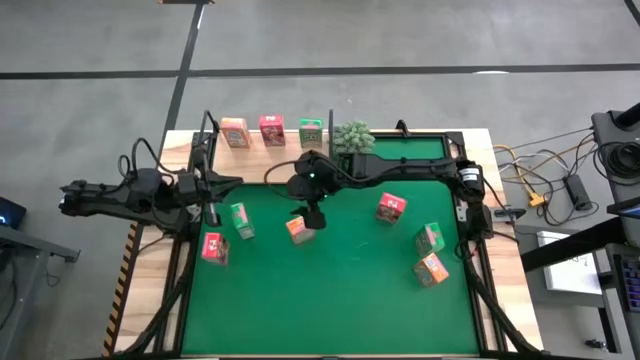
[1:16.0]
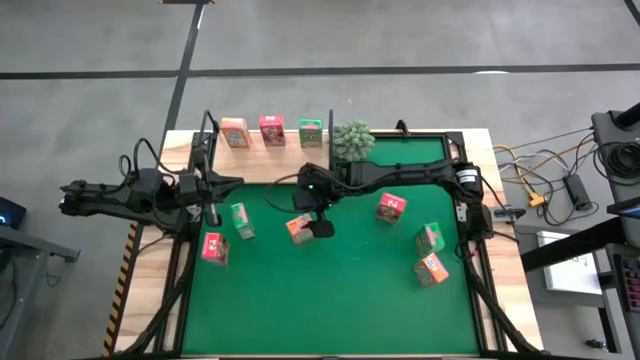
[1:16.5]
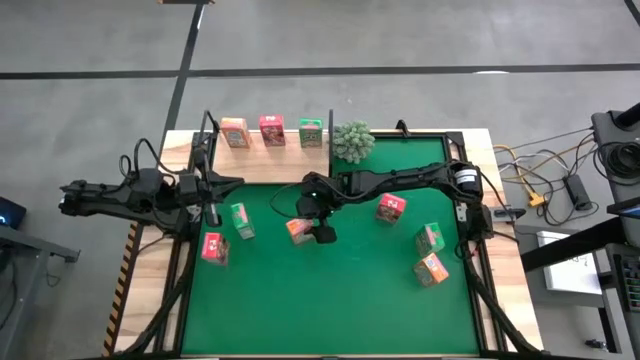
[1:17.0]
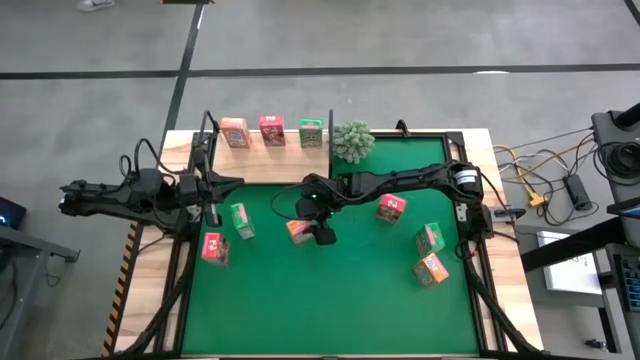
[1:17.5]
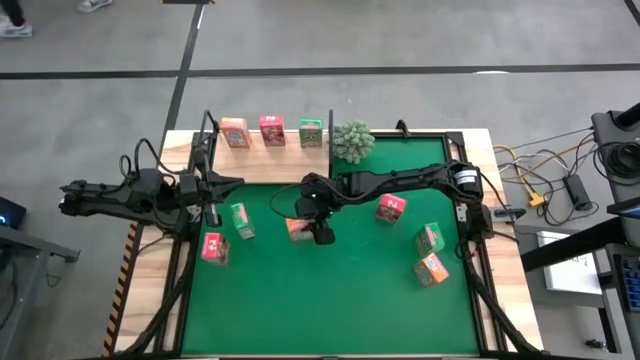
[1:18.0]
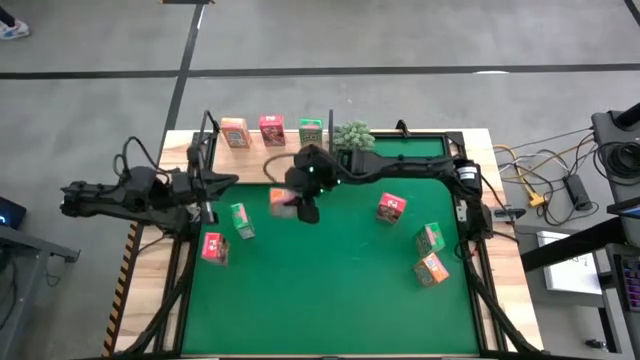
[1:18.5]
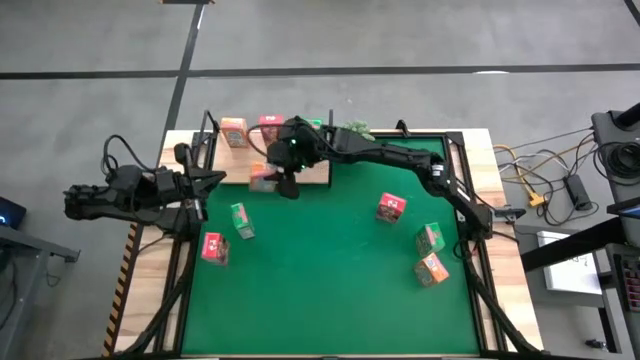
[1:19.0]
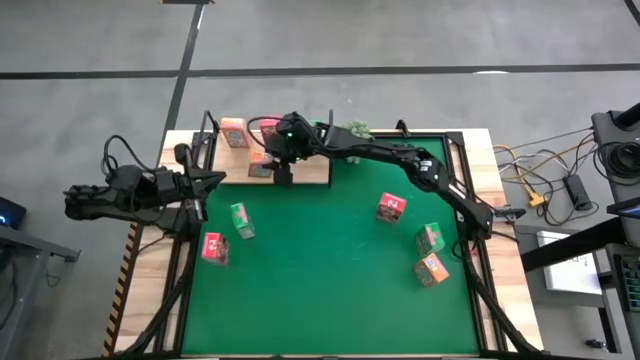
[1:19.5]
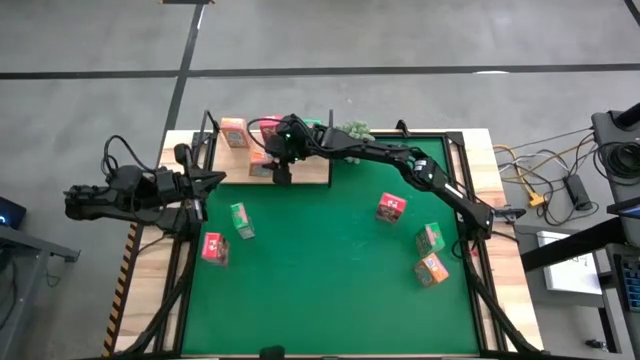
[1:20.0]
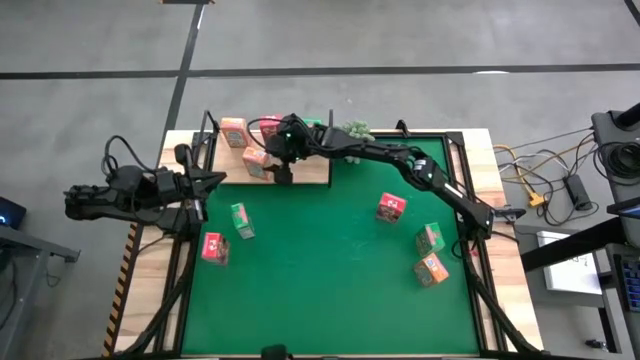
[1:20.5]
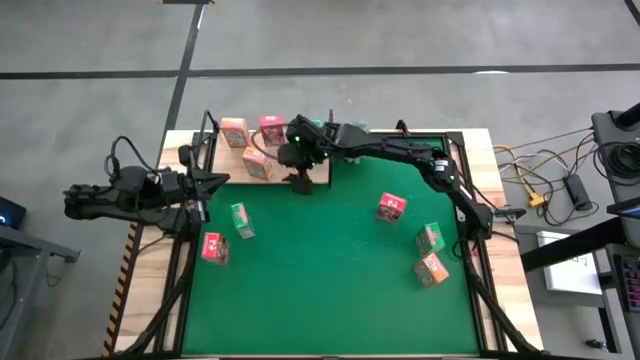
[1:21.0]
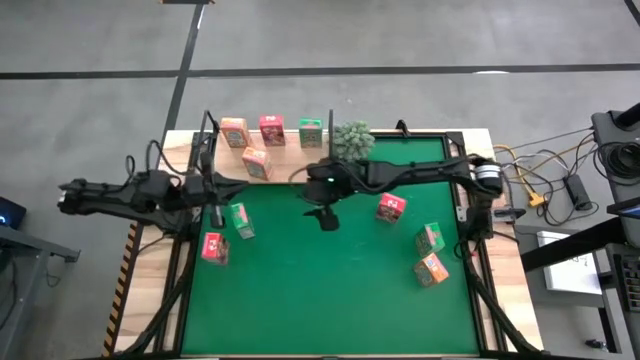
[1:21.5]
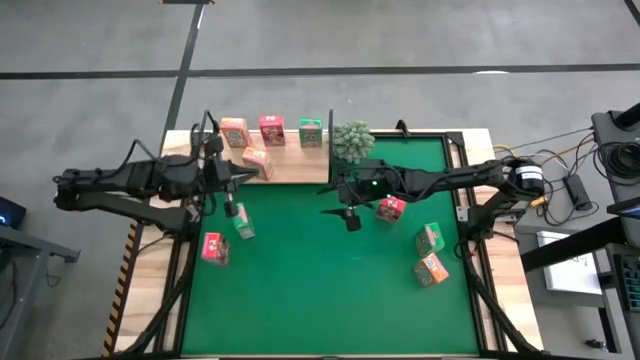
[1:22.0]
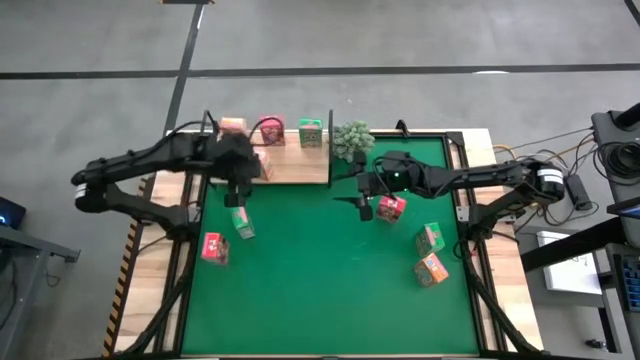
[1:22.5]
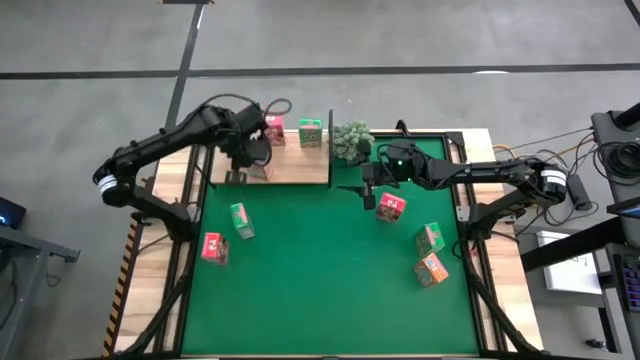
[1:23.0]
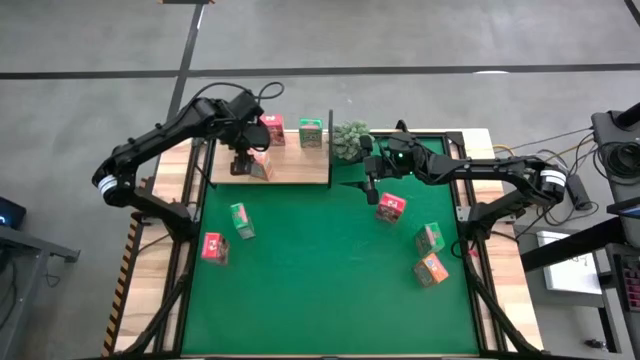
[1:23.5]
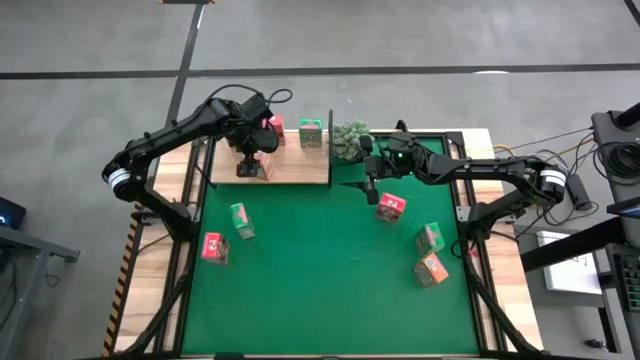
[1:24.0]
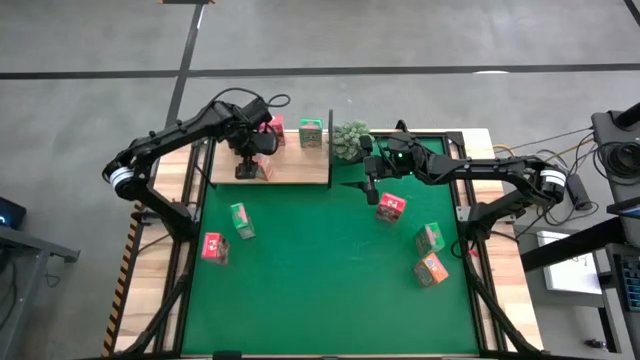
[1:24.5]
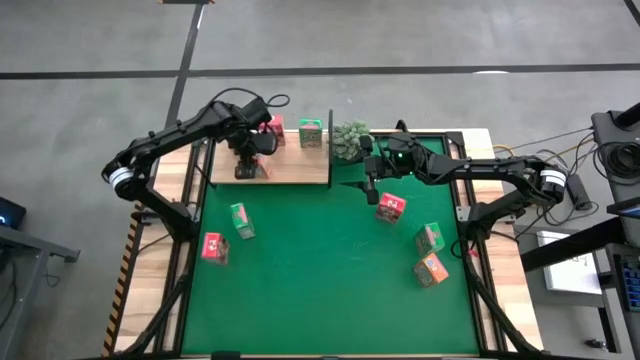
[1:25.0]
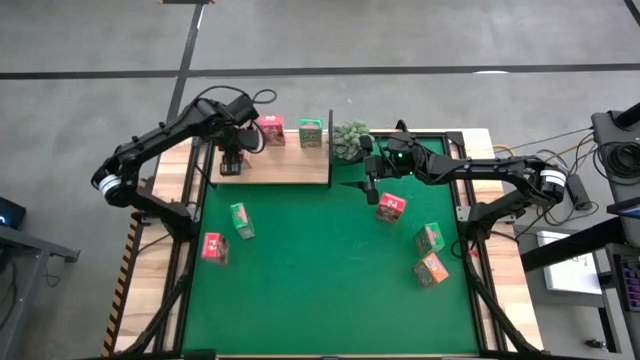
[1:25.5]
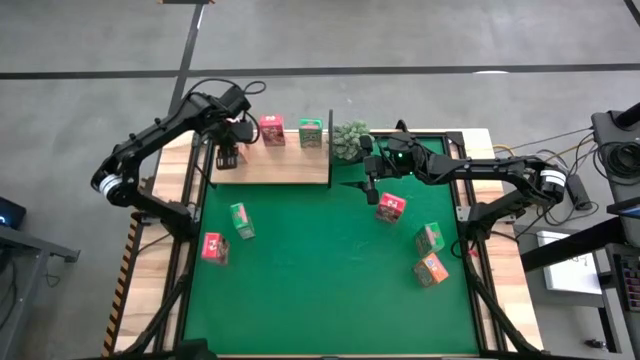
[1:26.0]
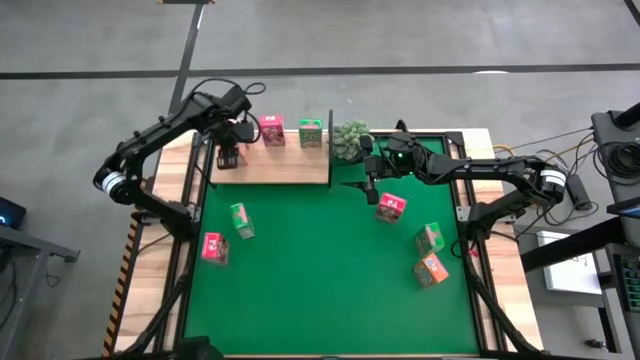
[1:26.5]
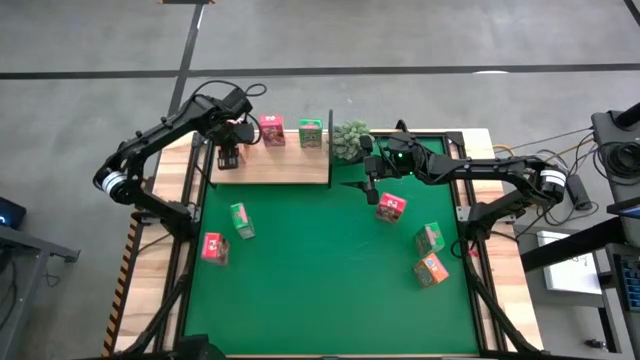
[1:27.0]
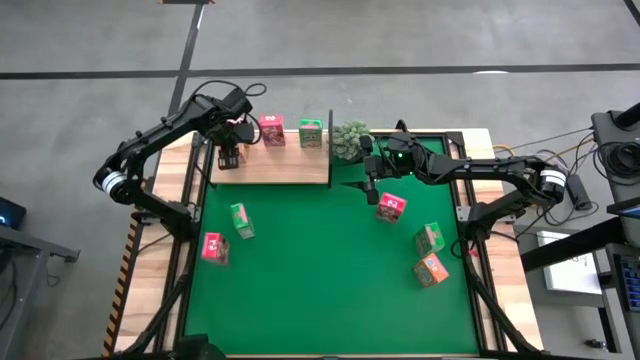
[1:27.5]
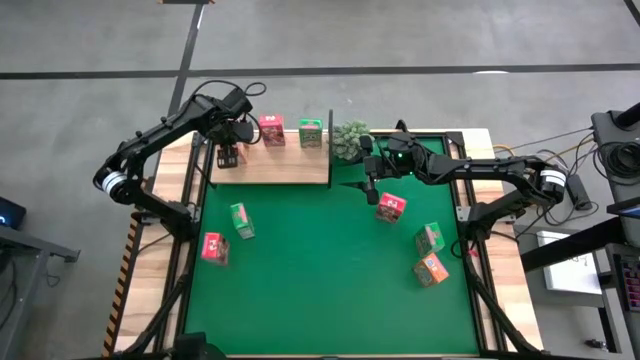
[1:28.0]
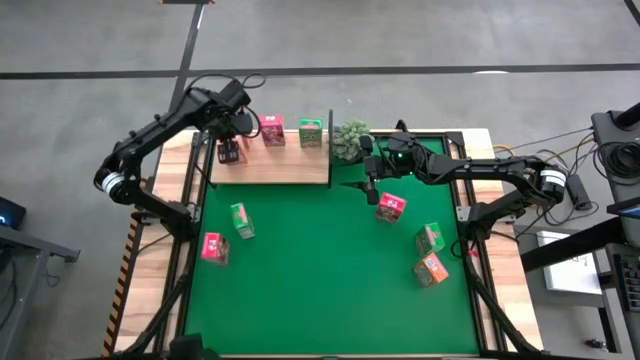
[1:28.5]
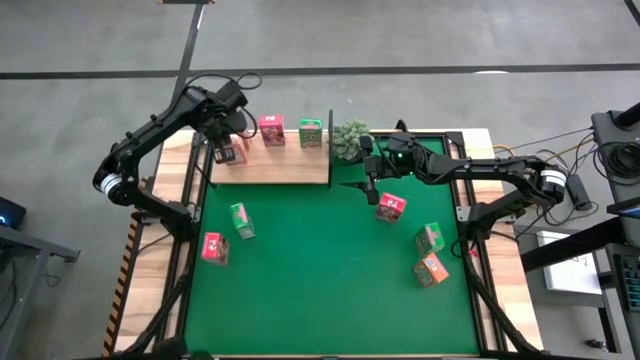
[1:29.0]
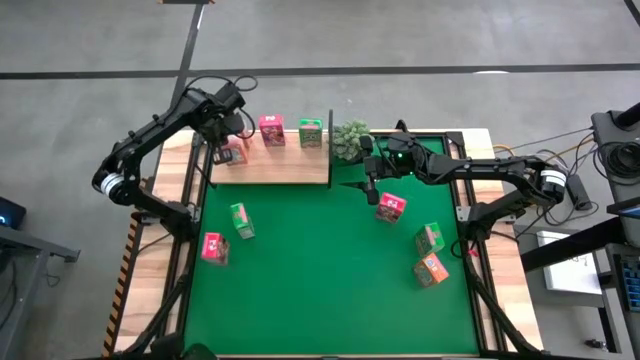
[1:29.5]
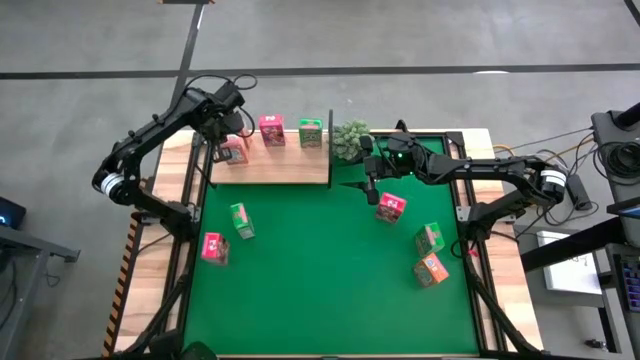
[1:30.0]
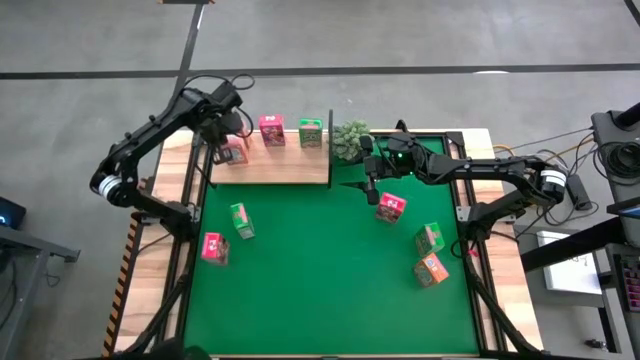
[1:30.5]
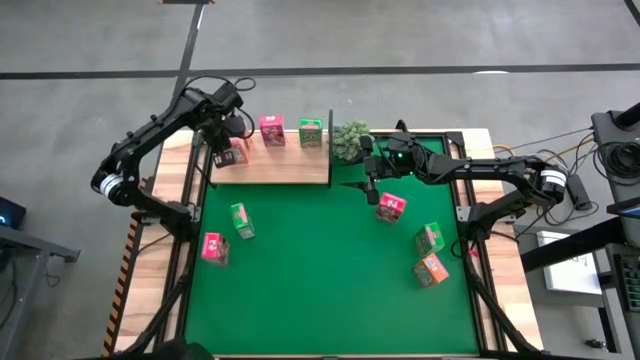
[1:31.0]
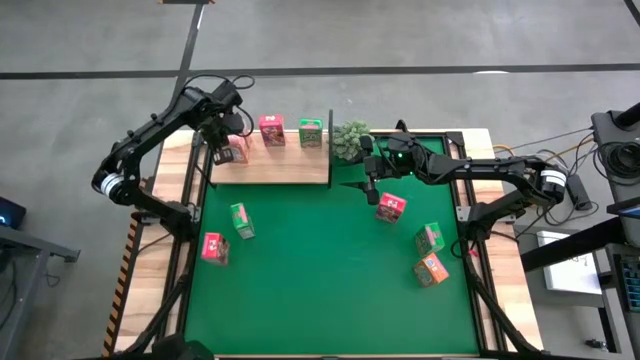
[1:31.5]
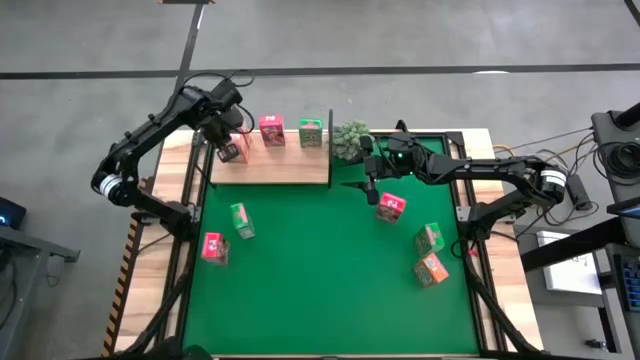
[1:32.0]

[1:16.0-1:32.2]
Task: Stack cereal on shelf
Put the left orange cereal box on the shelf aligned with the other orange cereal box
